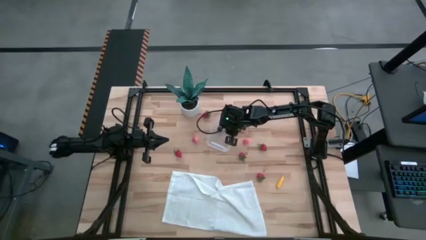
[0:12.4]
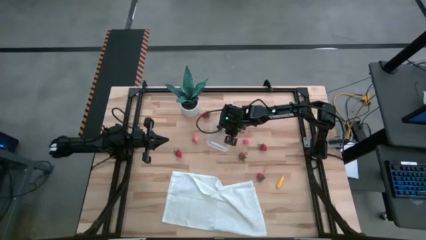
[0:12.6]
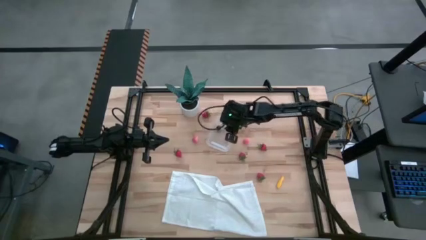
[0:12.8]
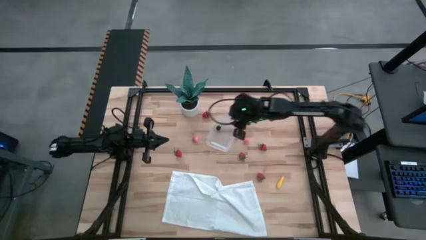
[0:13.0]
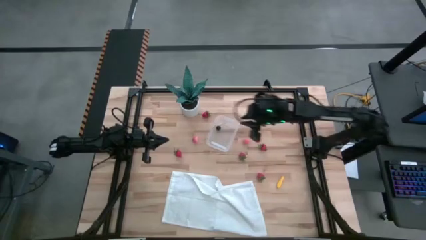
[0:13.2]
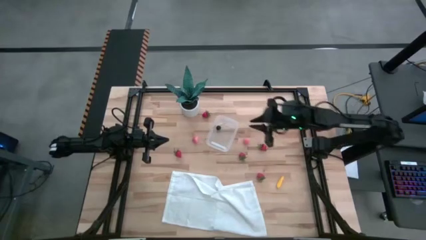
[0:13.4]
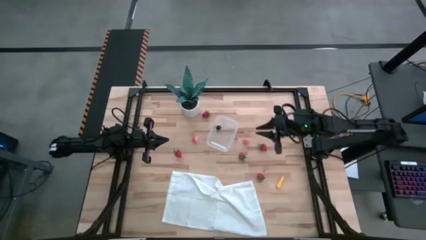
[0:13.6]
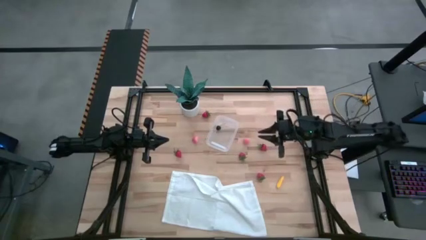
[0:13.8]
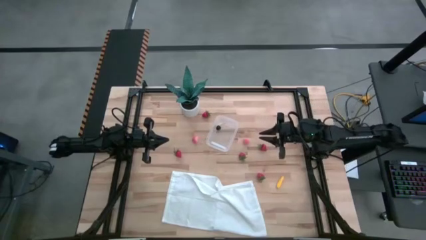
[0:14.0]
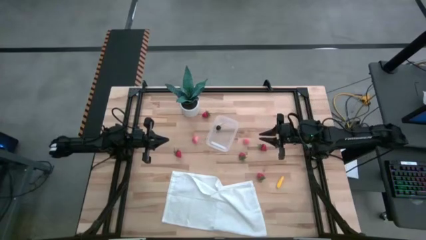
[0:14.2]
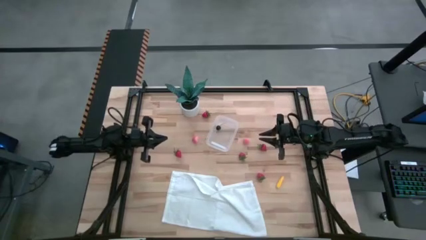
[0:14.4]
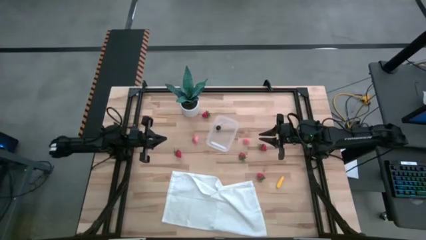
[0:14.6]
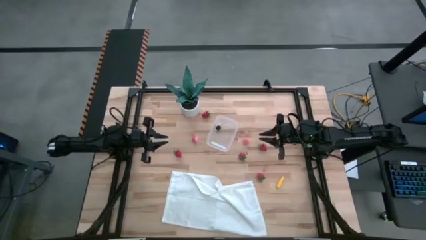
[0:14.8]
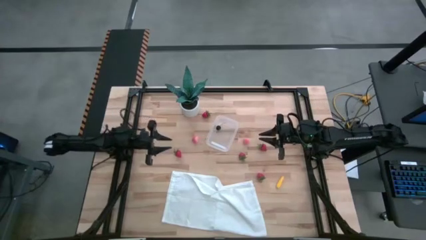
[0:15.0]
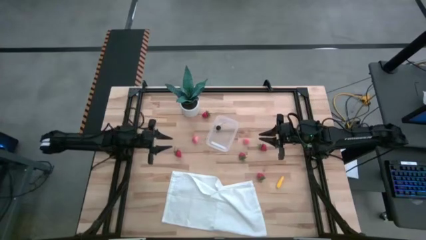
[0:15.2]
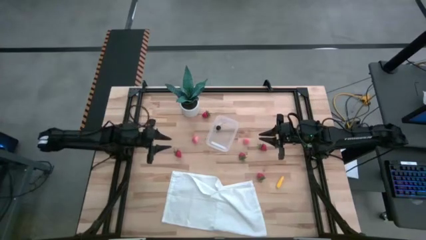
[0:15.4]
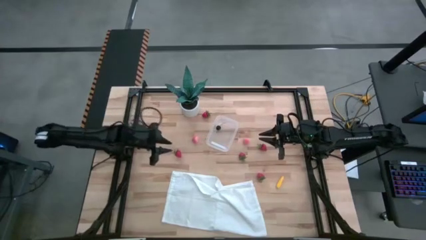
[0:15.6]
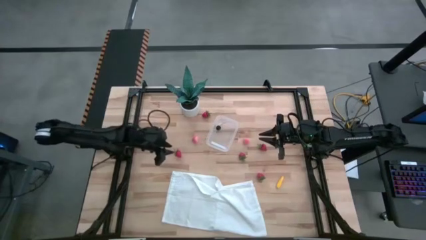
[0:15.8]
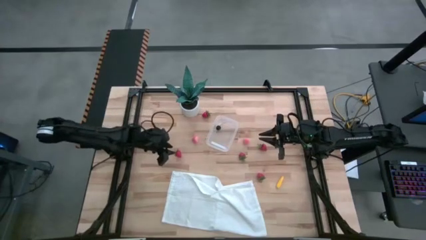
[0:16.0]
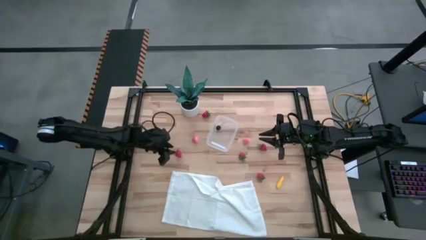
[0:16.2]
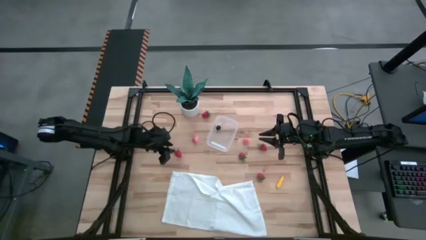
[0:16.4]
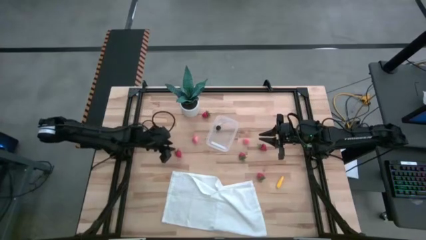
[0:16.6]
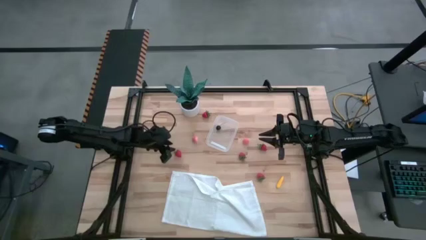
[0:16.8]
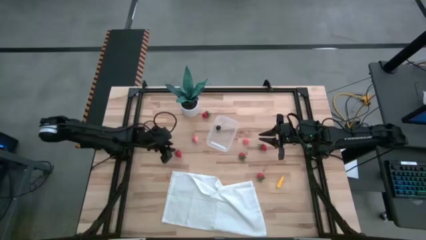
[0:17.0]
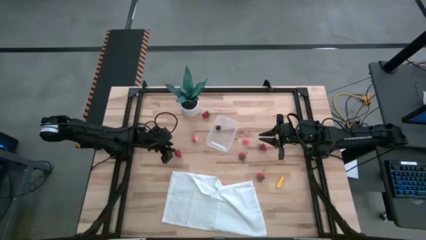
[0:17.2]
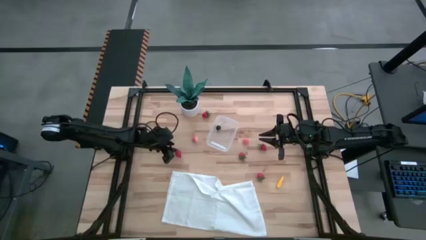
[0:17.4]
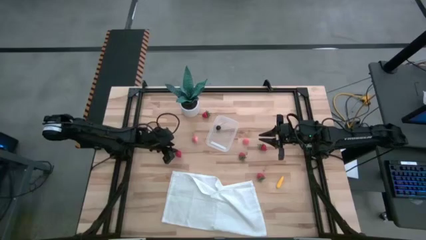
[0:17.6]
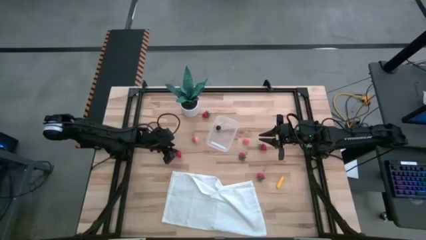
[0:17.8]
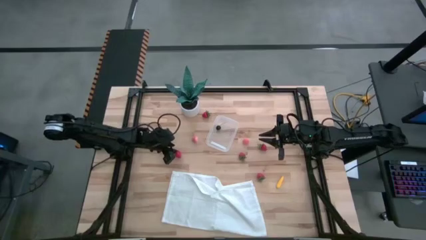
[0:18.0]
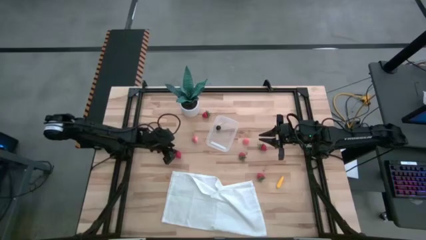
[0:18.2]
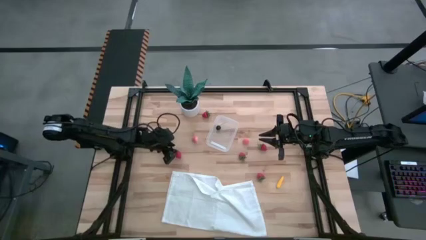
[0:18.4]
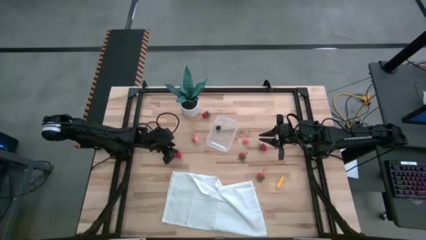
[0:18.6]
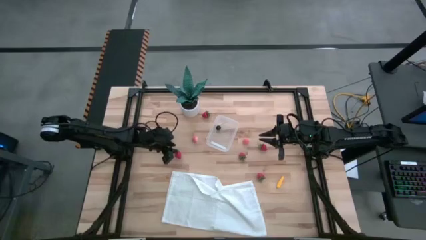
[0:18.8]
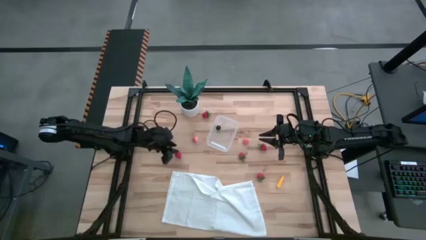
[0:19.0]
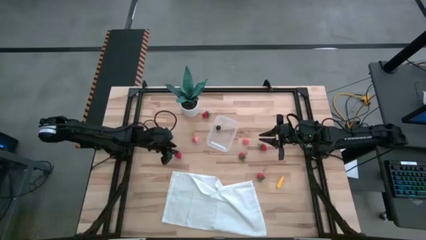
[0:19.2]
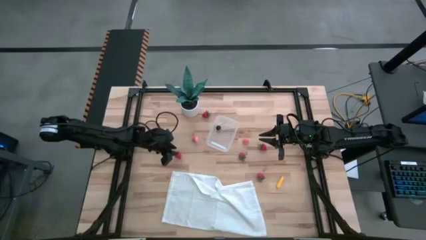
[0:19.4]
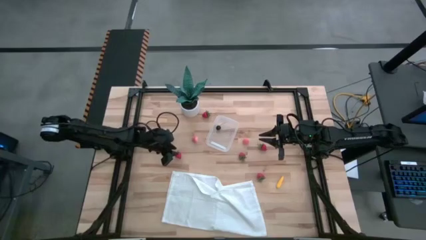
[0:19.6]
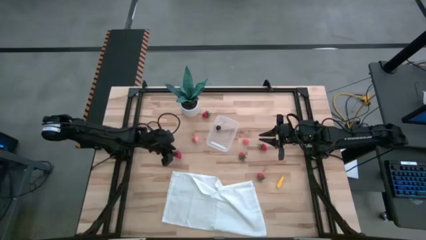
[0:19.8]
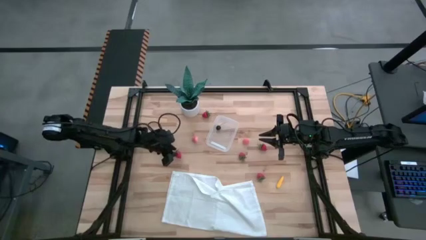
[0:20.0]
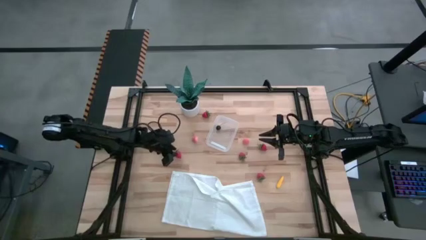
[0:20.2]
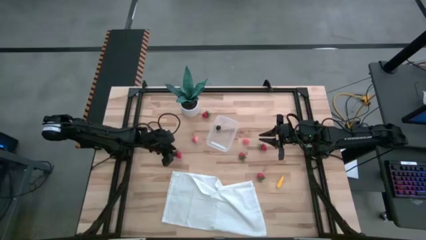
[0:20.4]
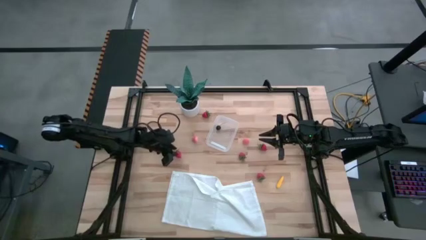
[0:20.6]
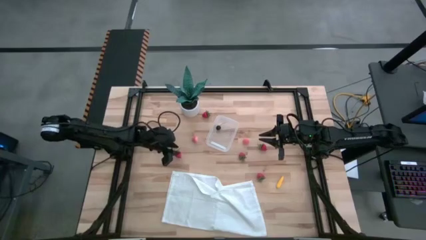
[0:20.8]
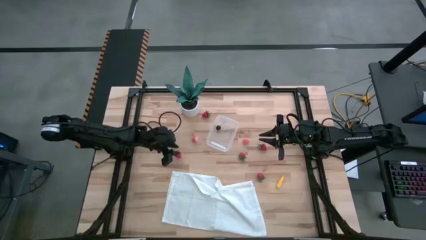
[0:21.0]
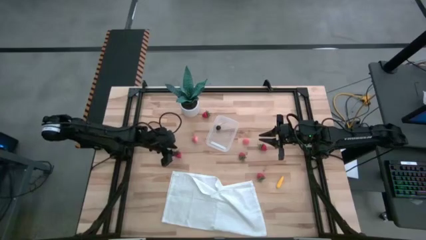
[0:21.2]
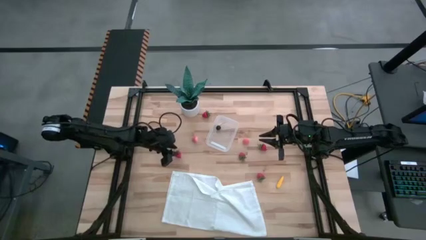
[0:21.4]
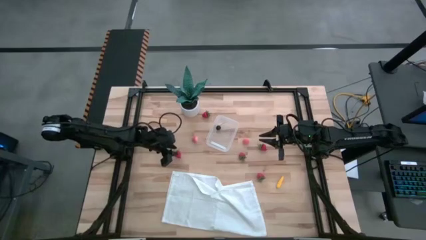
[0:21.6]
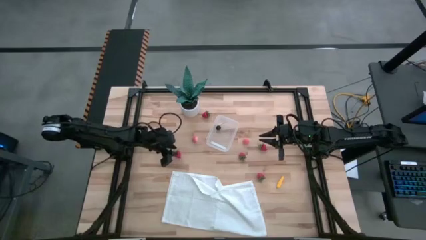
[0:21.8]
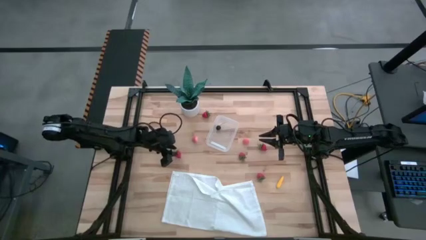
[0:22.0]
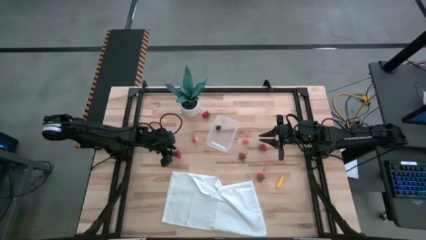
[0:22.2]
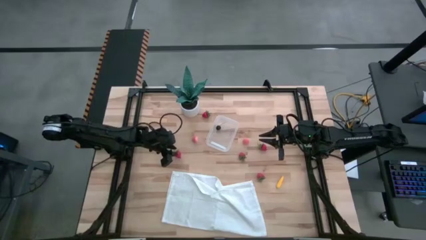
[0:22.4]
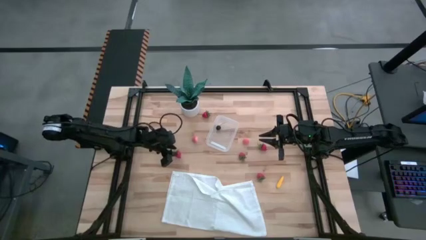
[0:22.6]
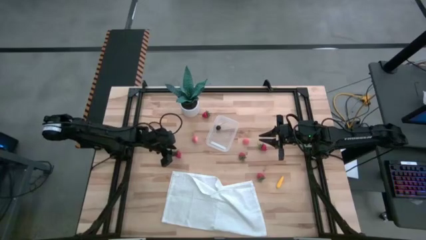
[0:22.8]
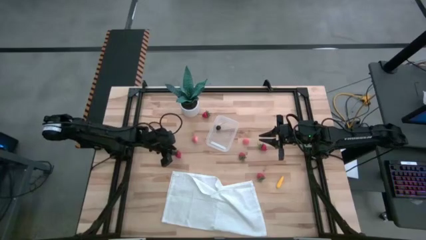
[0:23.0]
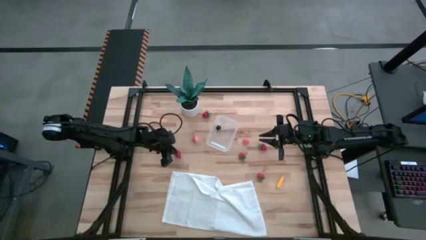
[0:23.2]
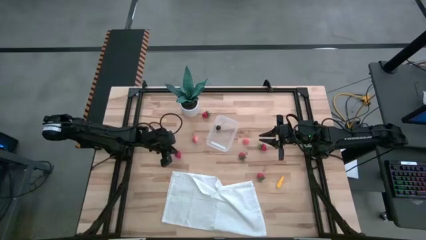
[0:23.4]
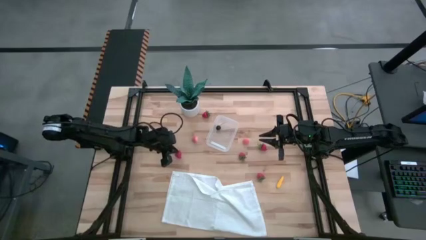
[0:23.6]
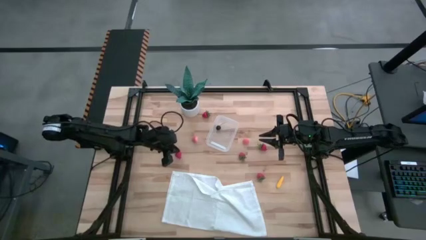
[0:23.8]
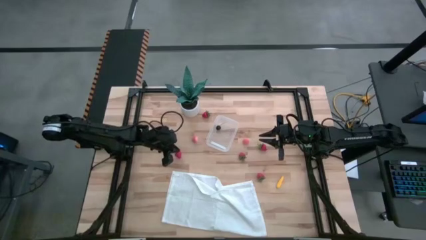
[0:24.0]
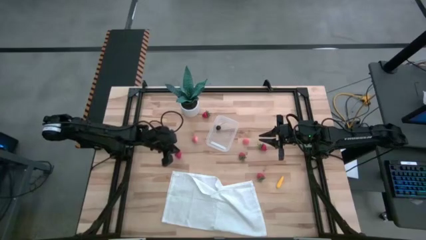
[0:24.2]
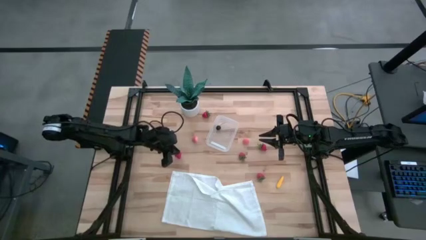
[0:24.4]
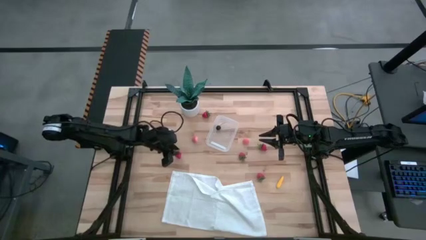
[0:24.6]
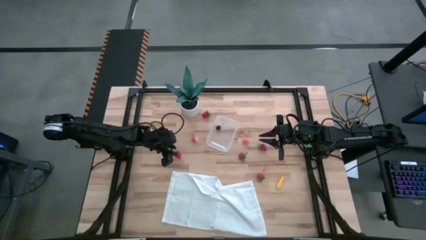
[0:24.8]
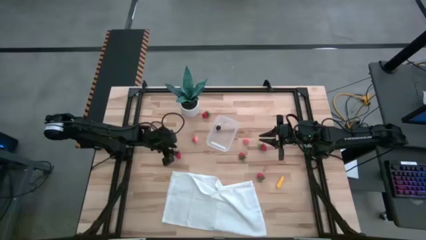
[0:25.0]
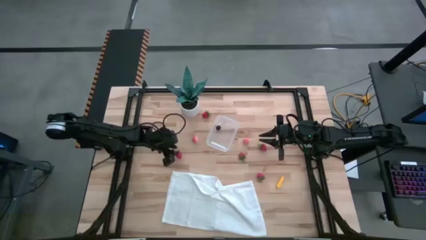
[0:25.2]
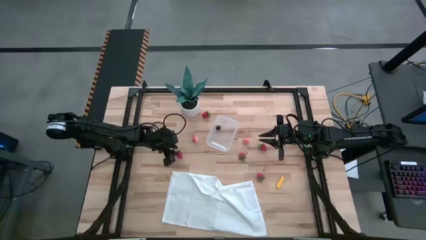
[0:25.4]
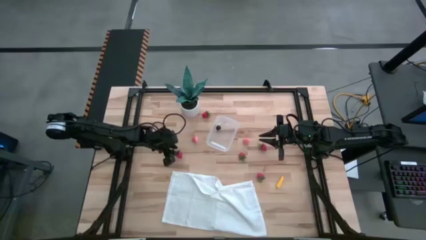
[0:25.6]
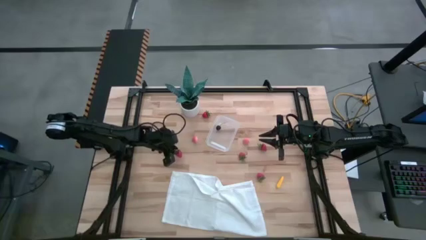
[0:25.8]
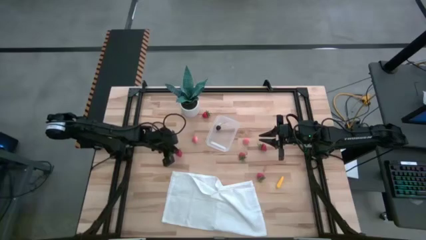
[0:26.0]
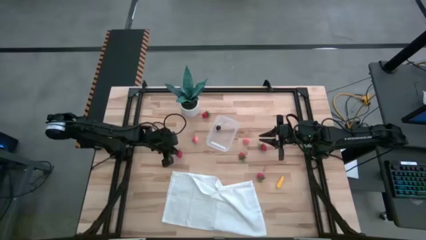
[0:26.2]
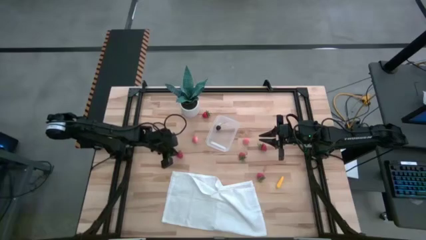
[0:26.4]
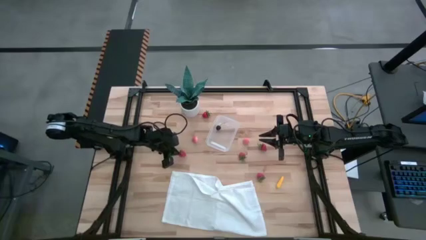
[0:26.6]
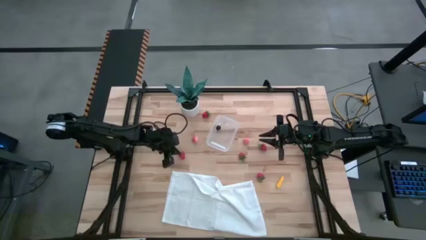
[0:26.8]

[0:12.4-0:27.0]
Task: Pick and placing Produce into tupperware
Put the red strawberry into the transparent bin
